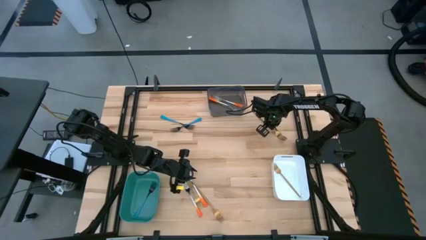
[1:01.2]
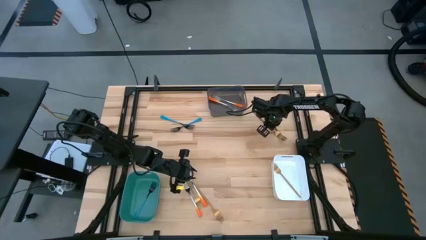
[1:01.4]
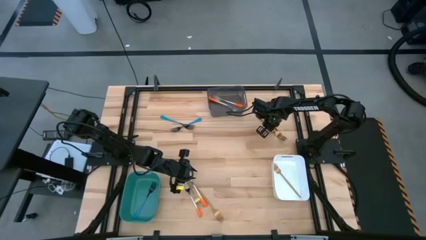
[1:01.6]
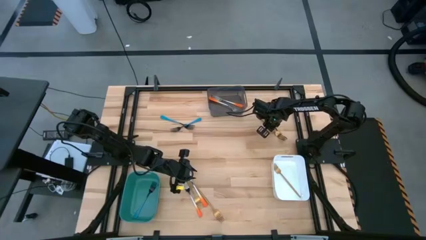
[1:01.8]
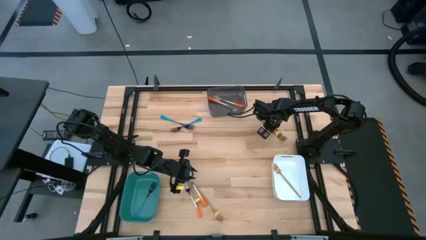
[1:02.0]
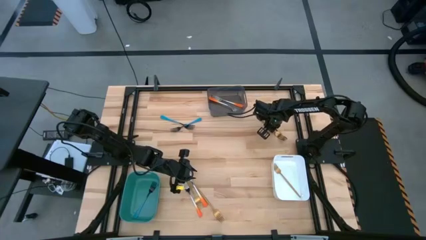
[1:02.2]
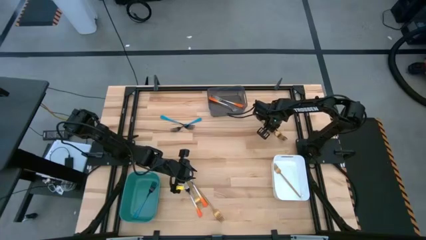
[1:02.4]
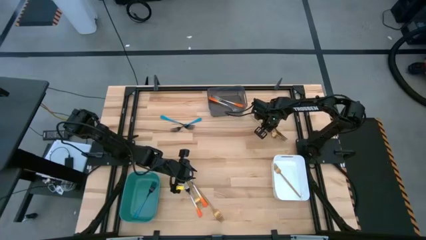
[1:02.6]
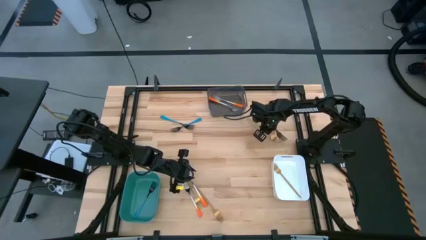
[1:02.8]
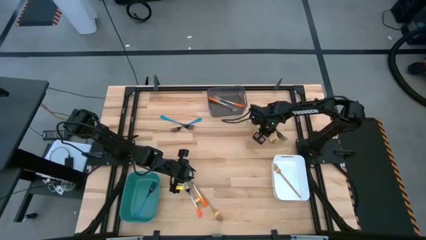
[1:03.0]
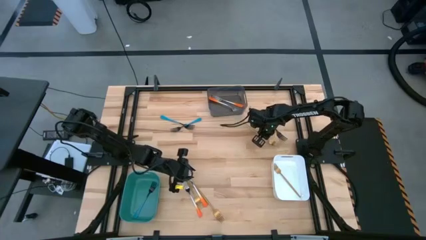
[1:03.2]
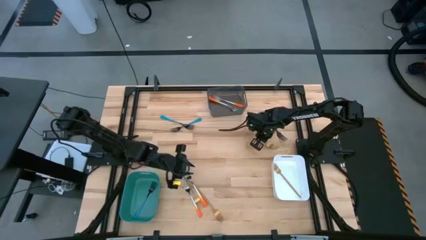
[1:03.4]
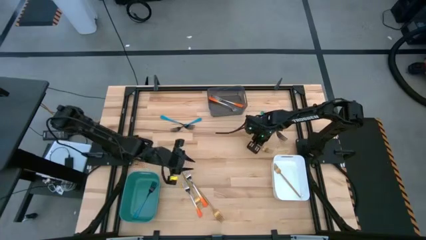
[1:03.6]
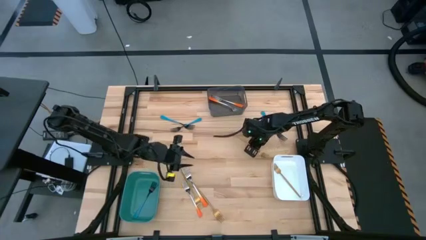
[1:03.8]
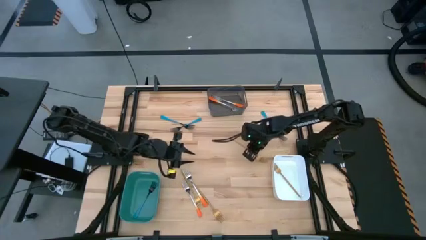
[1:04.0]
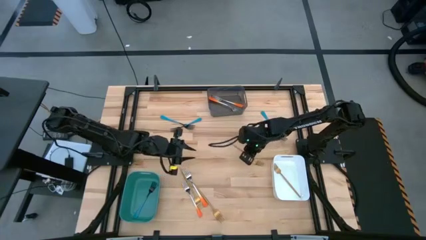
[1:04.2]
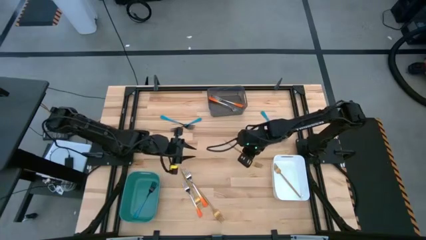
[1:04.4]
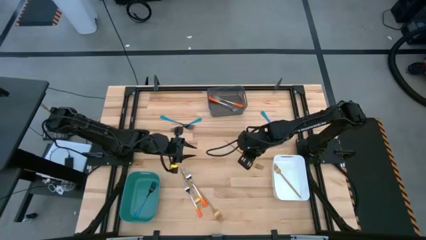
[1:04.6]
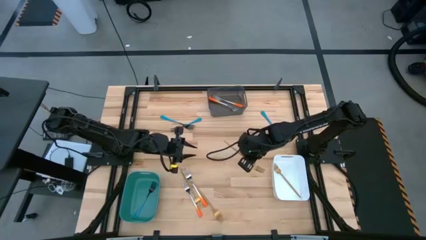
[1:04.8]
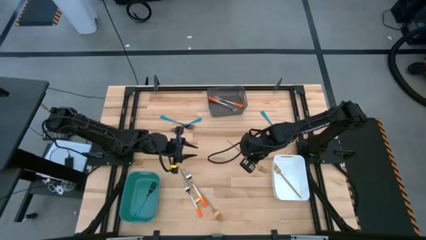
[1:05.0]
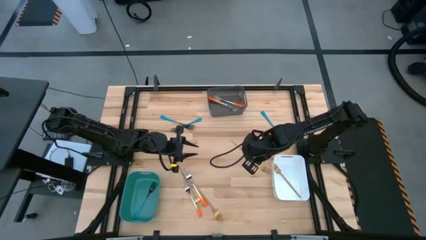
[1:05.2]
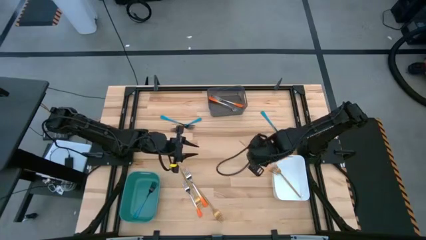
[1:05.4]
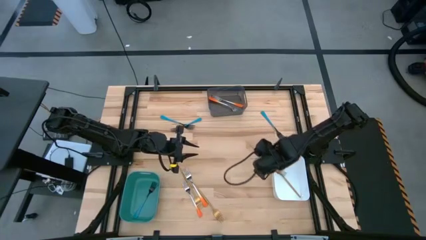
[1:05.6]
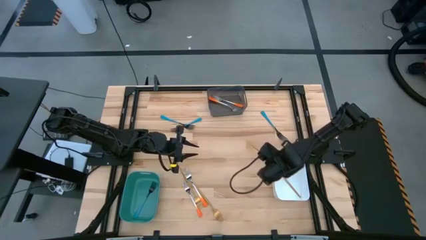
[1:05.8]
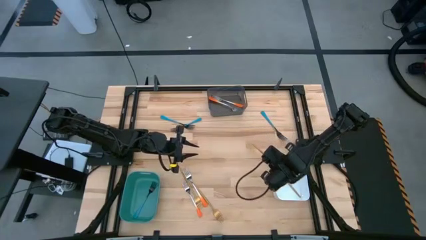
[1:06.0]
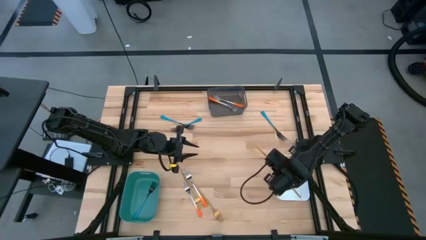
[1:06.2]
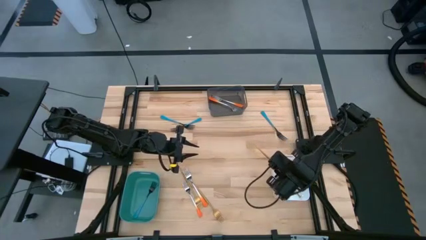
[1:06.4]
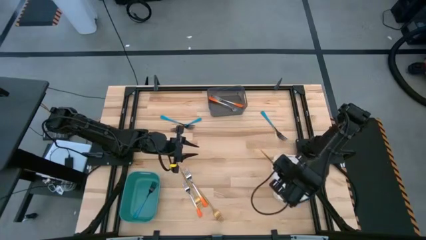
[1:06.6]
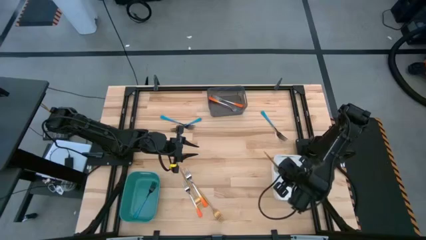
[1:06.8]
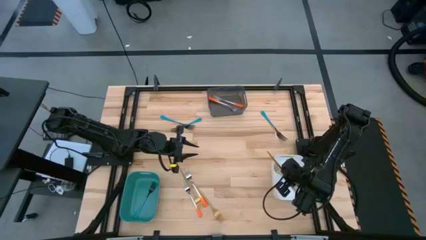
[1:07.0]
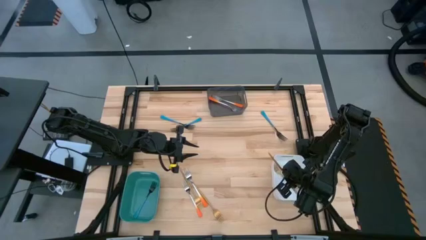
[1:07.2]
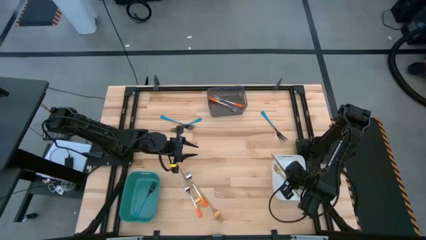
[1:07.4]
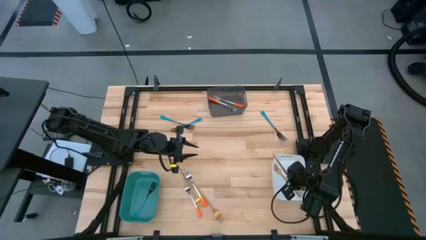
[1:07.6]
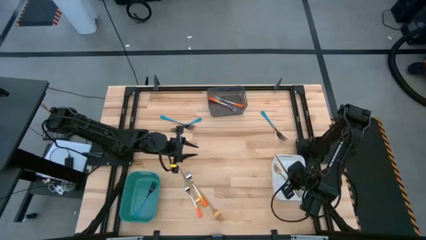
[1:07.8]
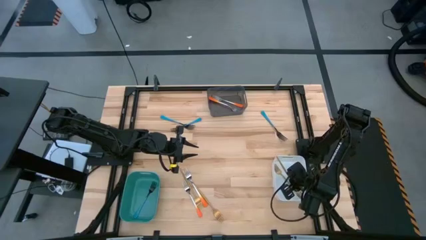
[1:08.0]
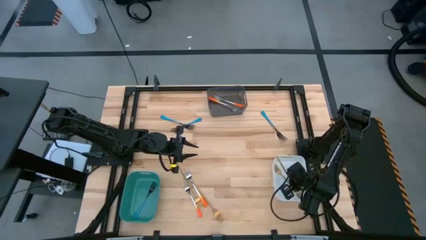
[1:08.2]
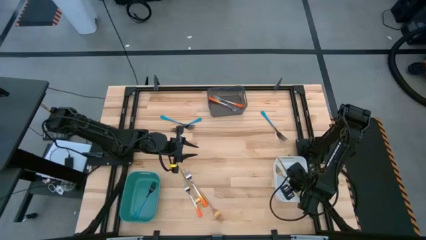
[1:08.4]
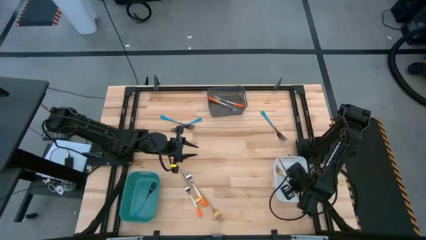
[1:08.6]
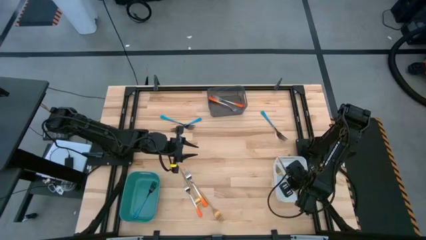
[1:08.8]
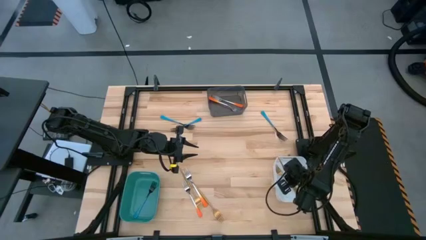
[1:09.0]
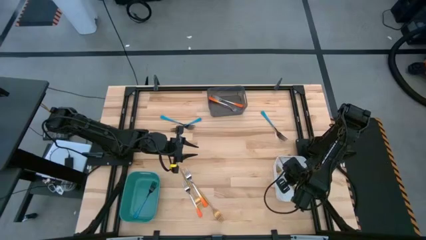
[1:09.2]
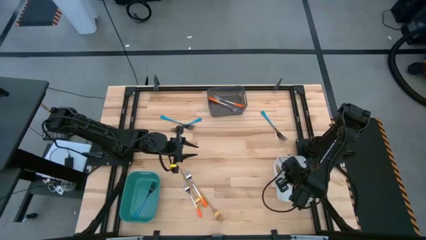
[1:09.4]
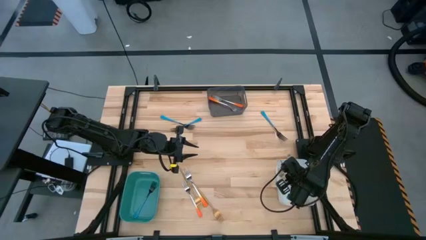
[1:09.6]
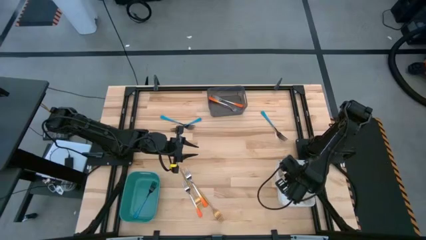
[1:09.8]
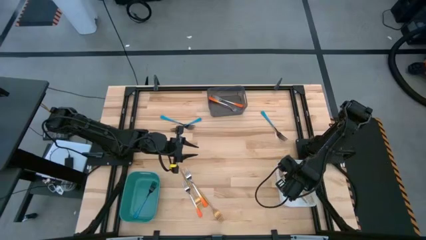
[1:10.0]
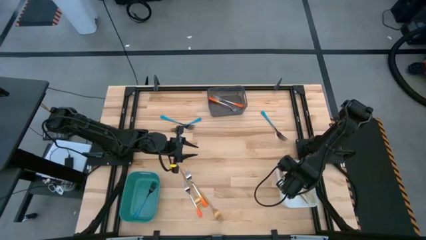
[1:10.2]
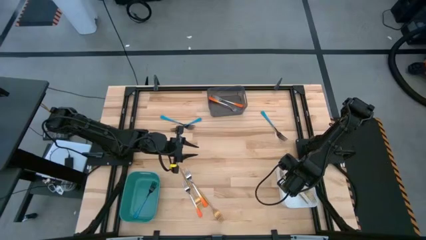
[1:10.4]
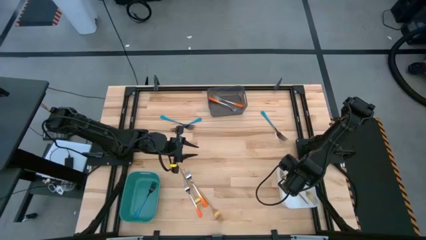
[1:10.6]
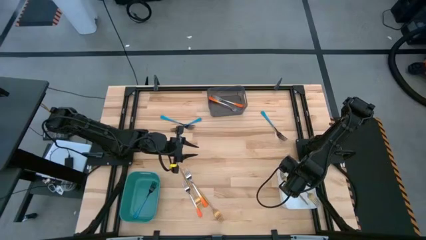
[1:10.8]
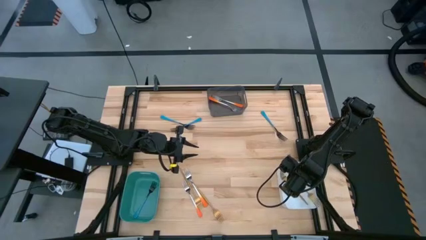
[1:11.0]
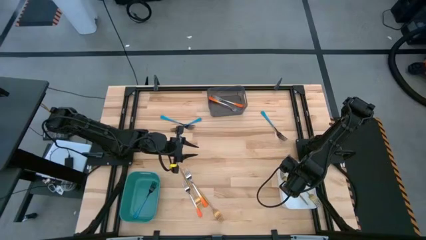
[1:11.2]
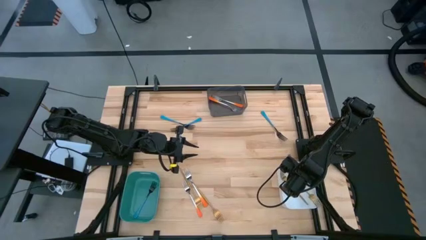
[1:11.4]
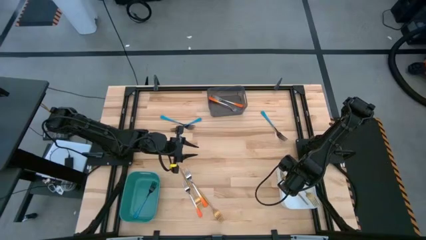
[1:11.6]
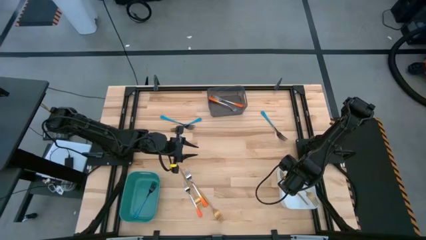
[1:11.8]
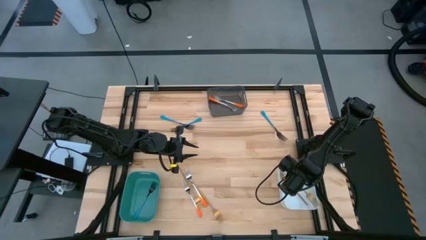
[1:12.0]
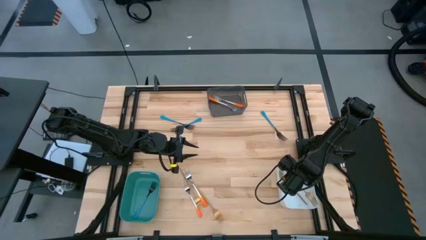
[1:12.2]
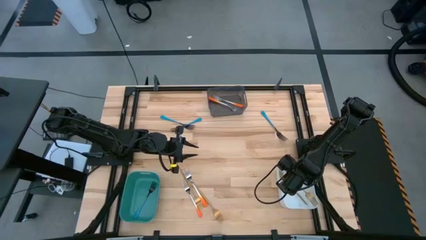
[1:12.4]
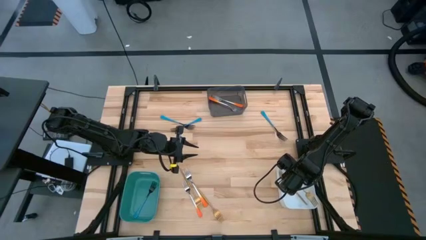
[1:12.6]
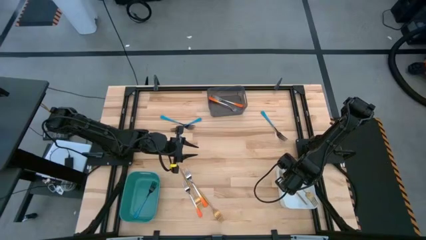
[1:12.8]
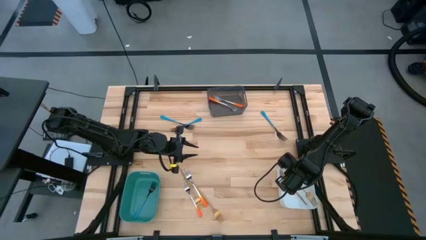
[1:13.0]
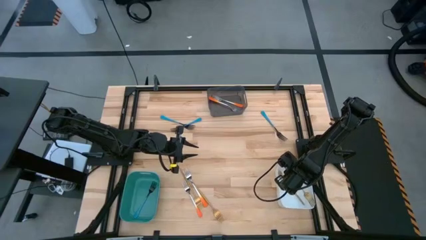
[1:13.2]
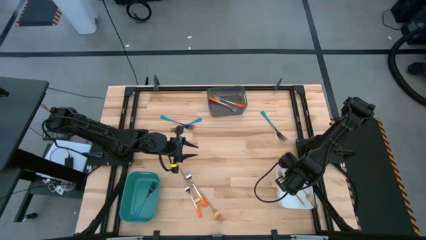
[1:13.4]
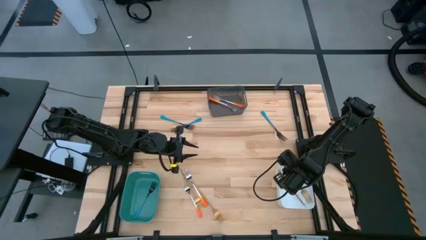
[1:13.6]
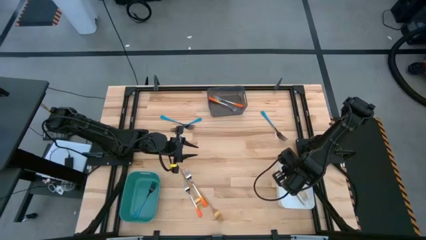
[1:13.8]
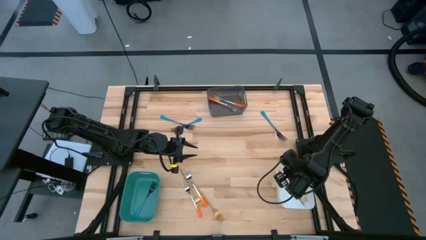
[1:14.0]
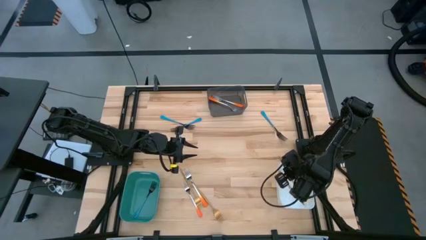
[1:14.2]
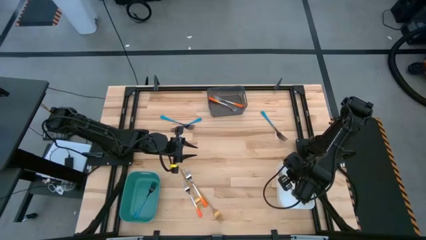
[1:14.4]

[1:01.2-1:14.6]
Task: Sort silverware by color (type)
Put the gold fork into the white bin
